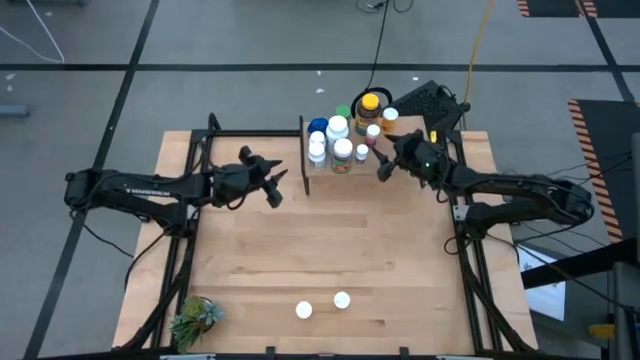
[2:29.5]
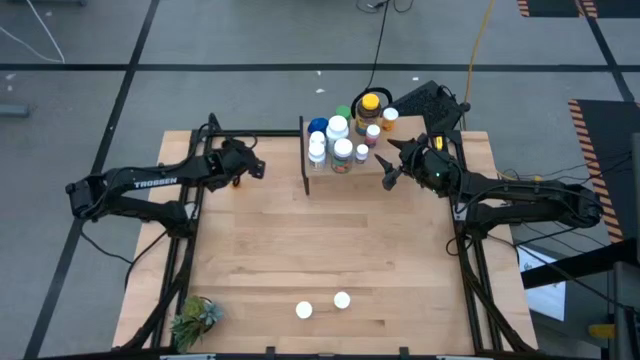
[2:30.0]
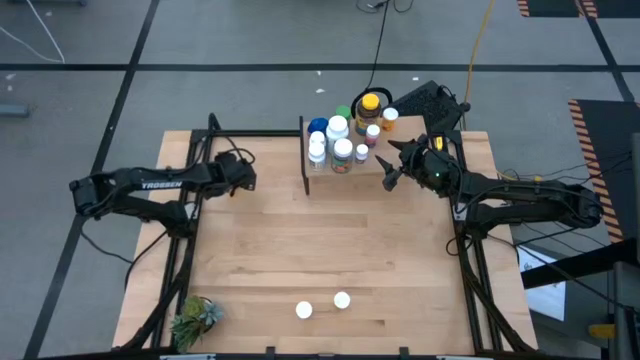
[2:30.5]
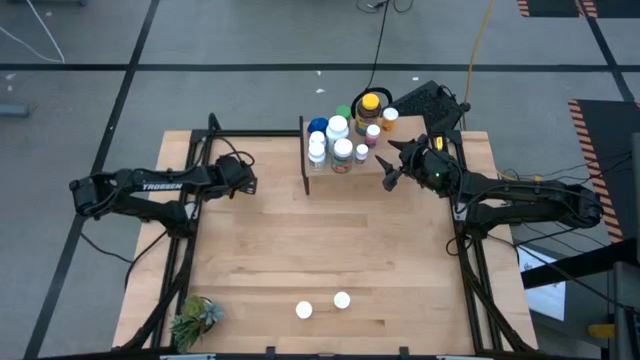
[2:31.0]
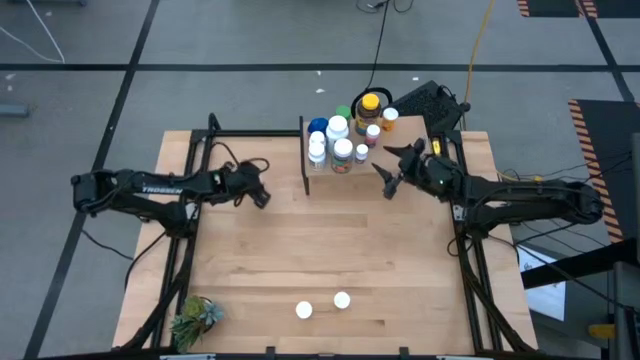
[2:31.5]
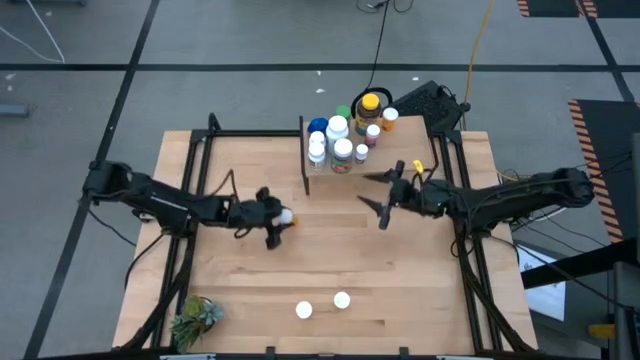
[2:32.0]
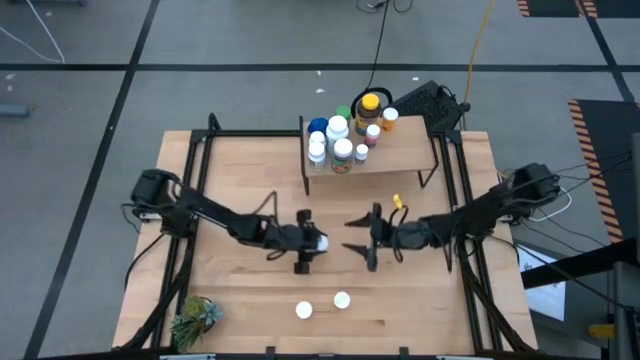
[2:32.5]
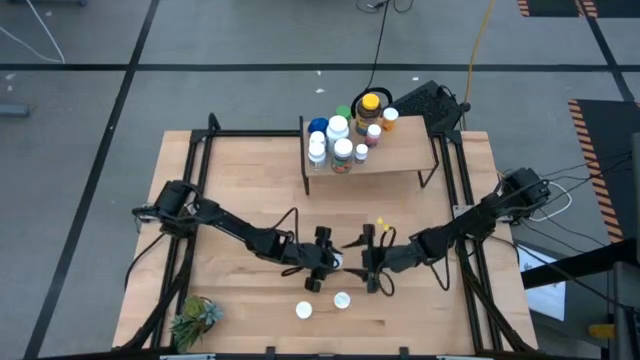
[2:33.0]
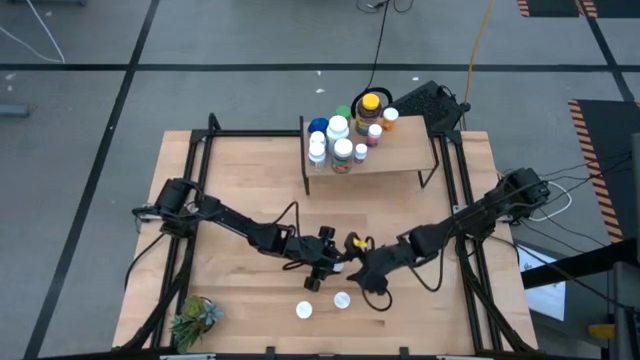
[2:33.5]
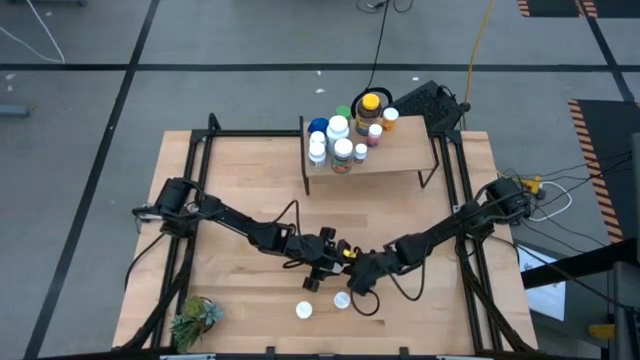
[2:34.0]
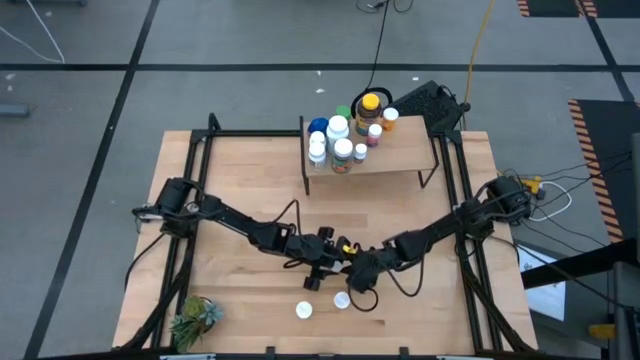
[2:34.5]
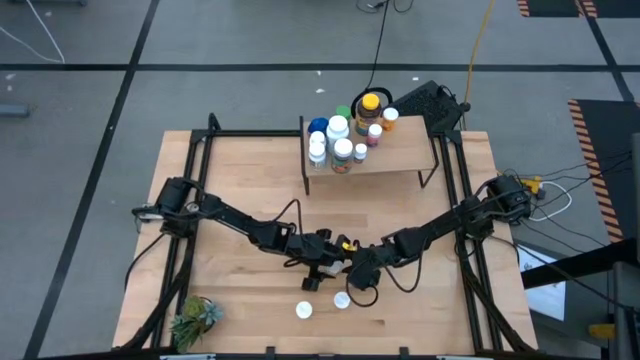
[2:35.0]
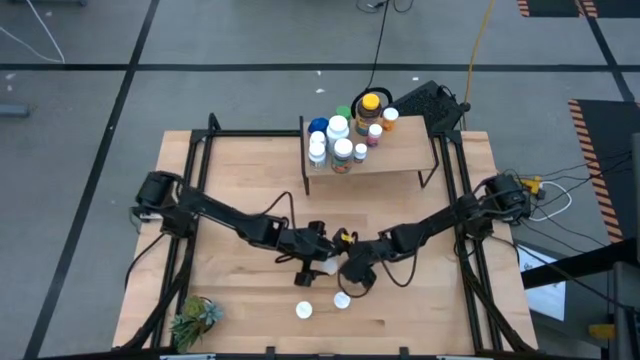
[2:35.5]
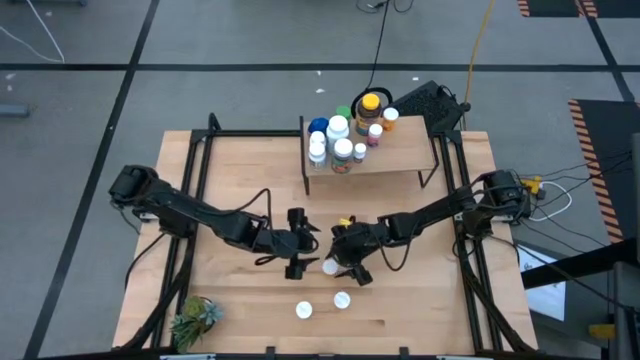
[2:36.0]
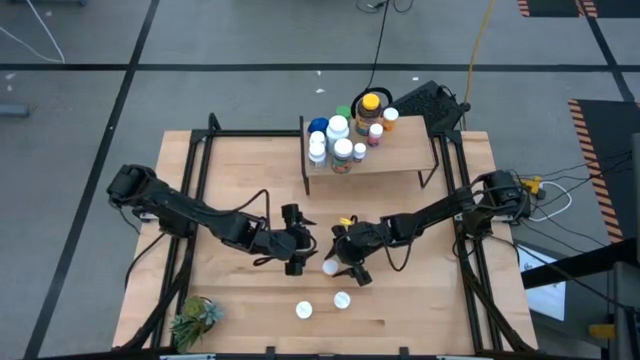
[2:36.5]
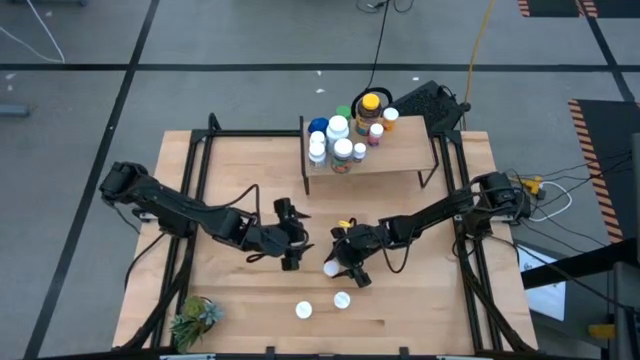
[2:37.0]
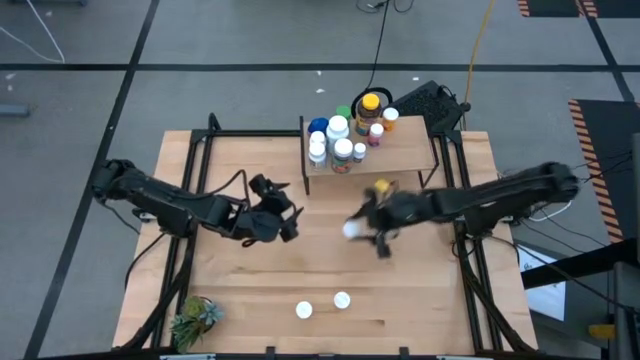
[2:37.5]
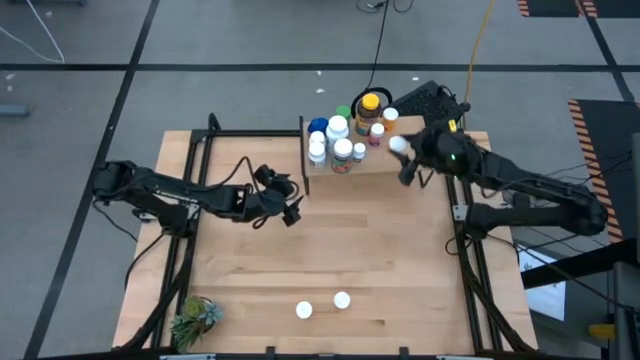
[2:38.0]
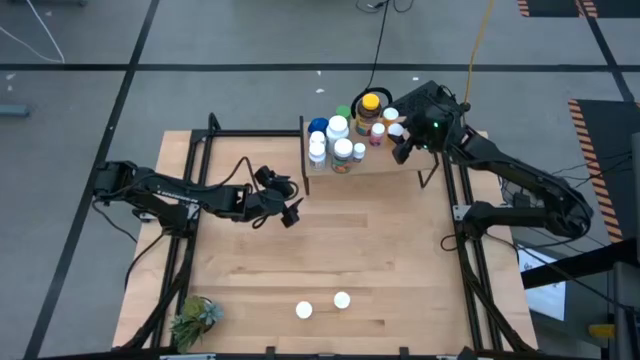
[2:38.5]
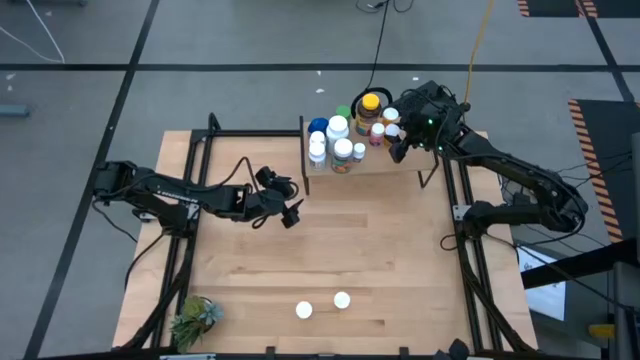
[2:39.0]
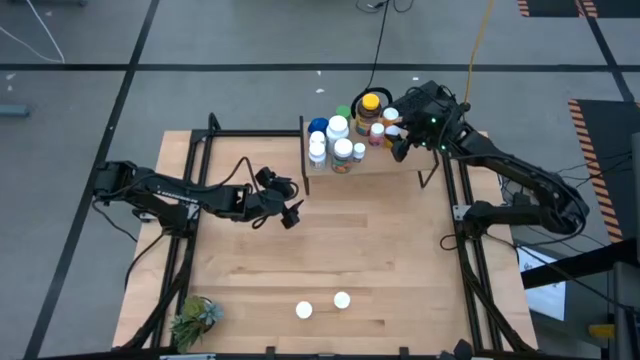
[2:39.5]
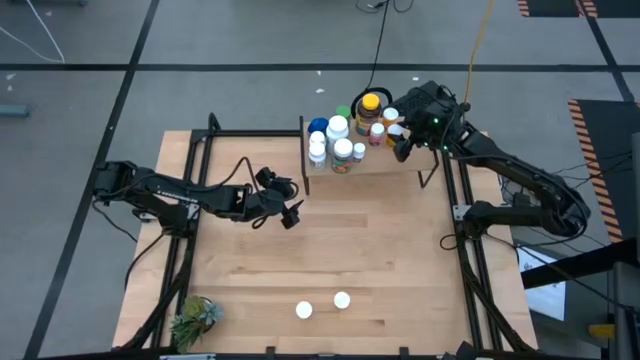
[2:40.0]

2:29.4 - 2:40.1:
Task: Pick and place medicine bottles onto shelf by color
Put the orange bottle on the shelf

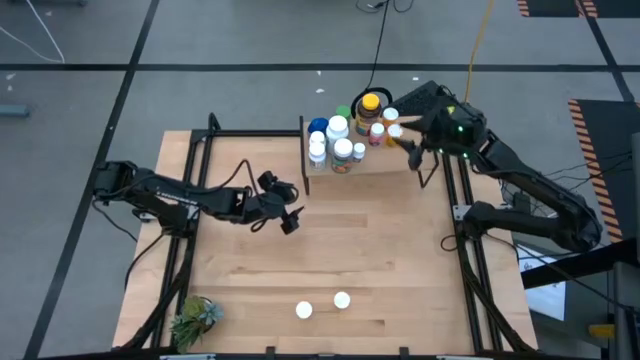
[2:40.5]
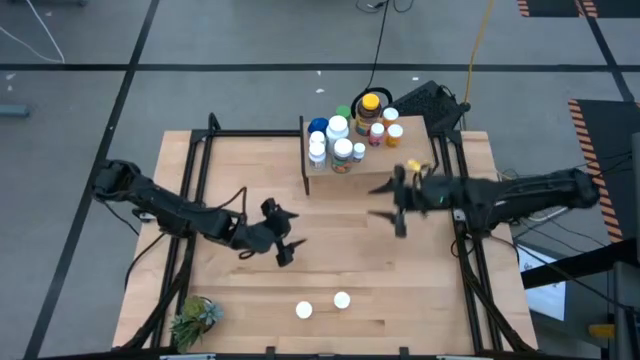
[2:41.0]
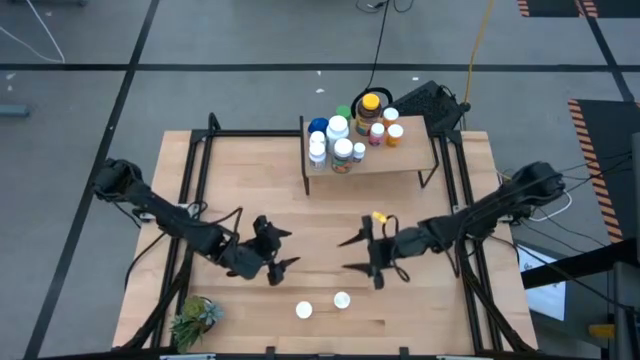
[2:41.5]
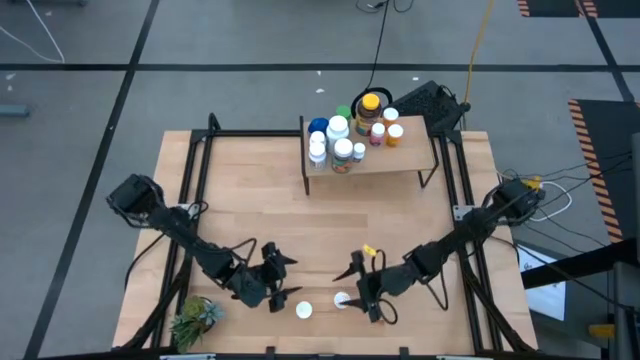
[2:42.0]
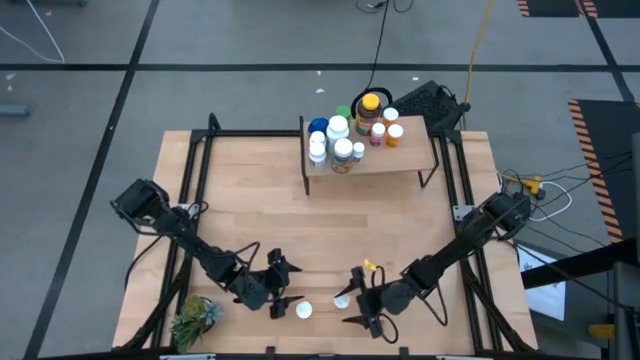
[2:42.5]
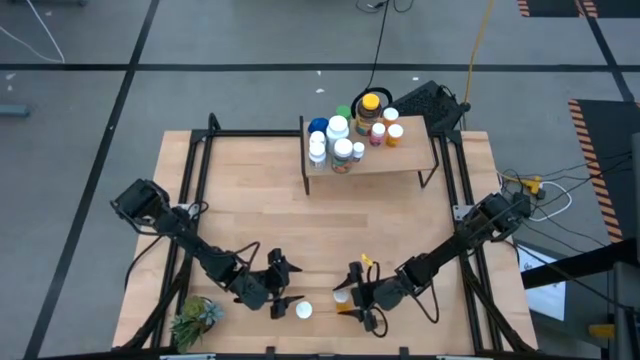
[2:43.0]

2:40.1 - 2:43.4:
Put the orange bottle on the shelf

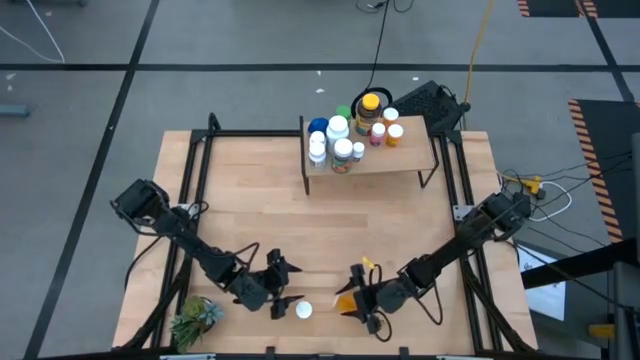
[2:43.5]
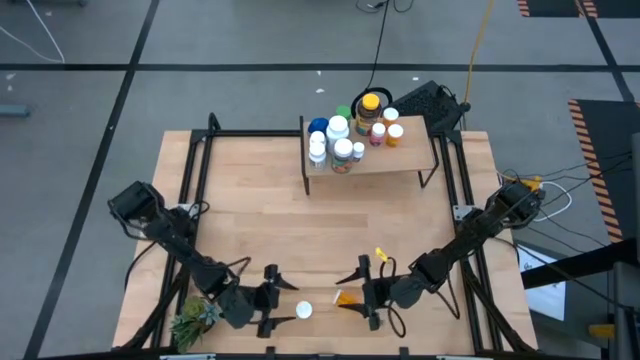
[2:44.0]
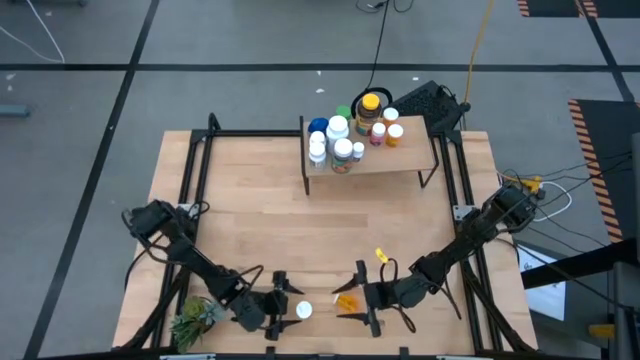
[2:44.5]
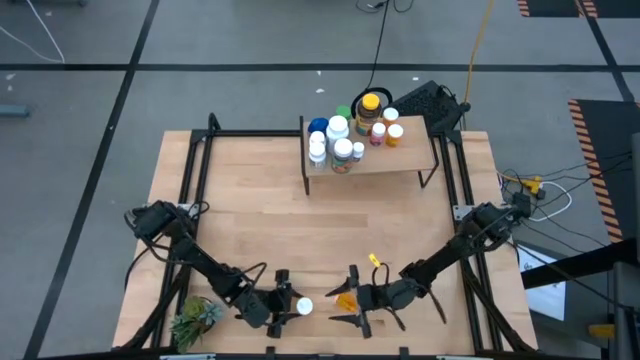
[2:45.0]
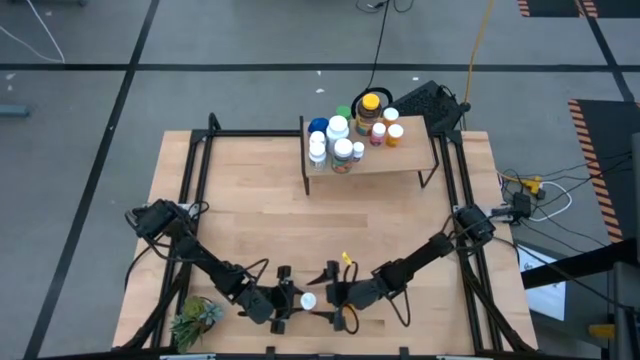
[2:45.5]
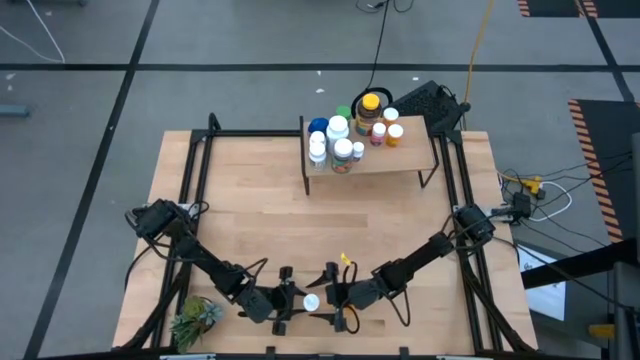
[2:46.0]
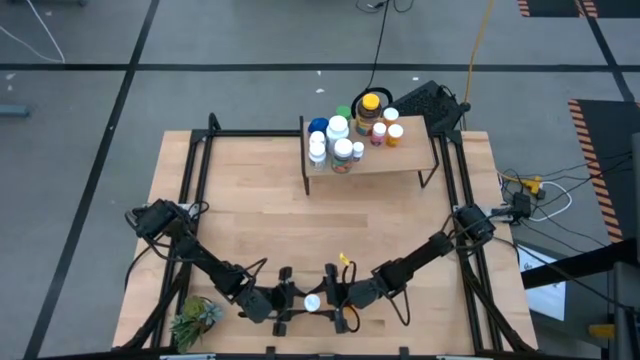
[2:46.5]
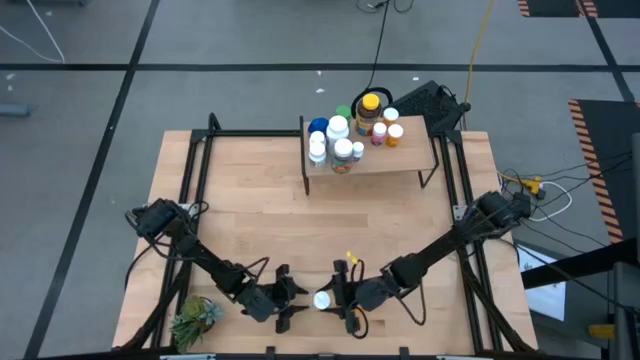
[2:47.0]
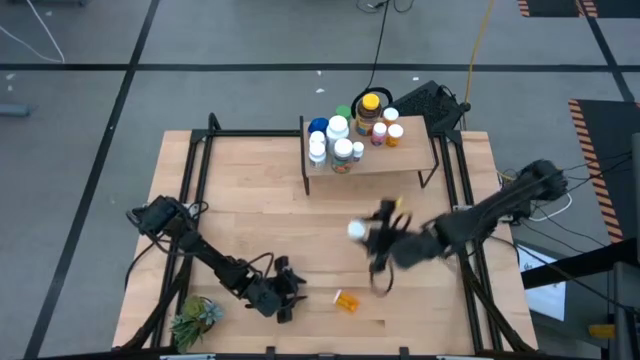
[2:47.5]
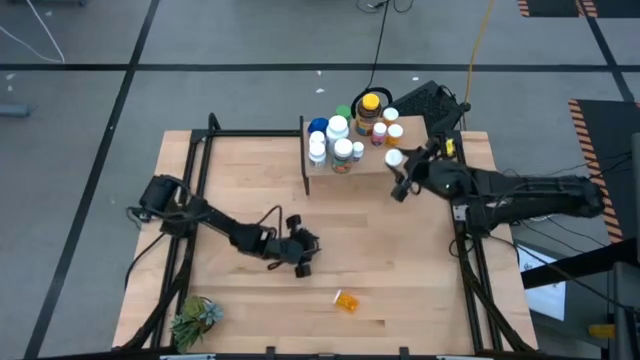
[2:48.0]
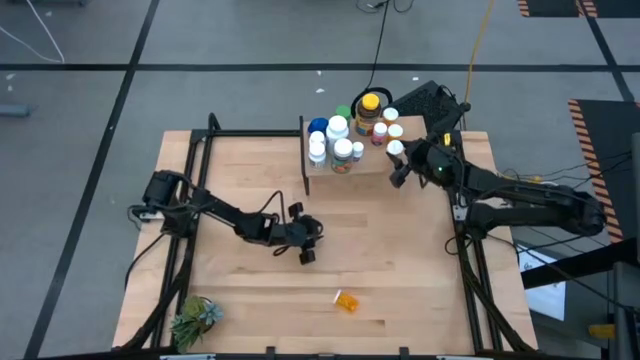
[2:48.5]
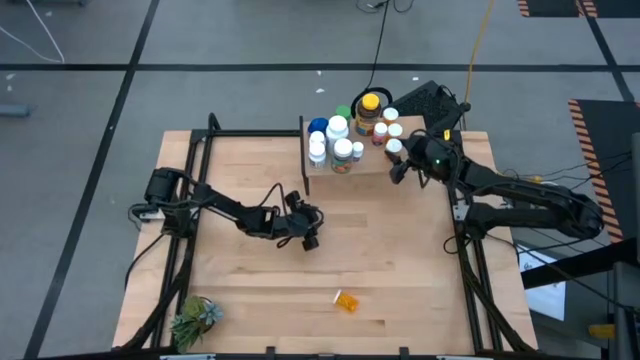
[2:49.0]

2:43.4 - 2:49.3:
Put the orange bottle on the shelf

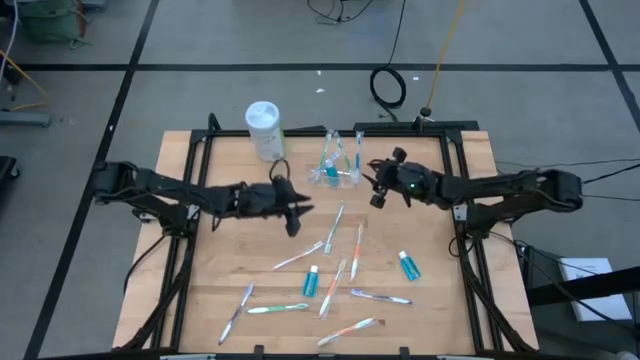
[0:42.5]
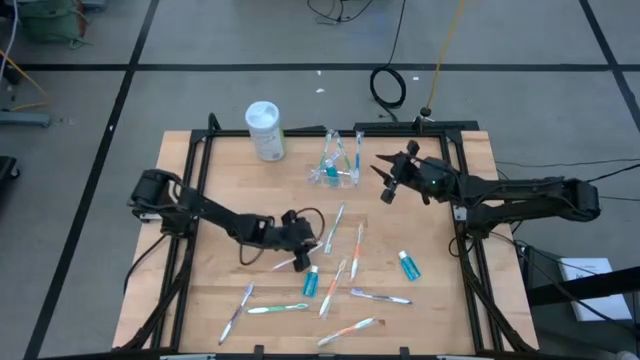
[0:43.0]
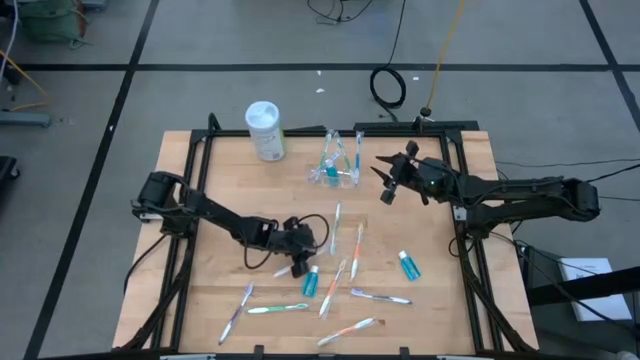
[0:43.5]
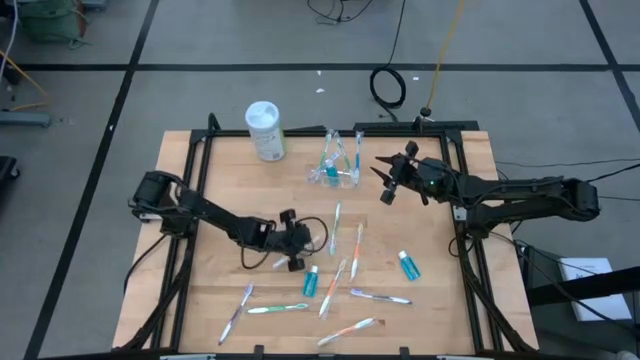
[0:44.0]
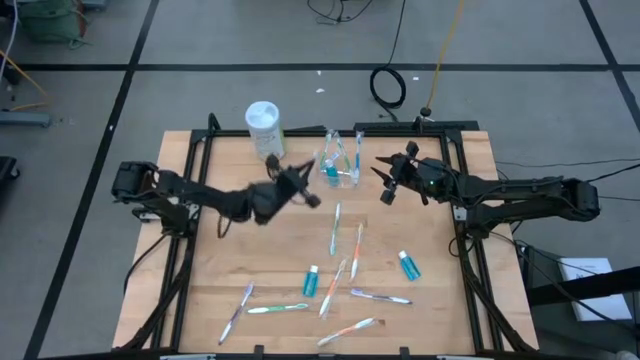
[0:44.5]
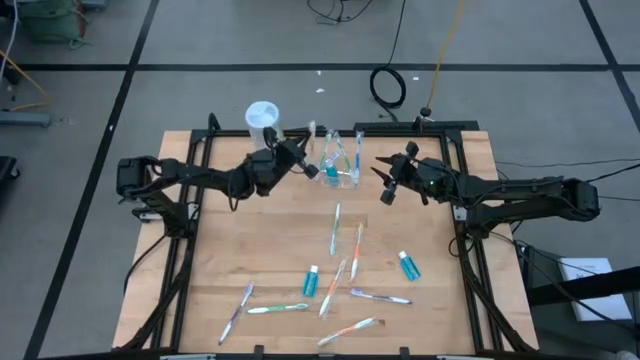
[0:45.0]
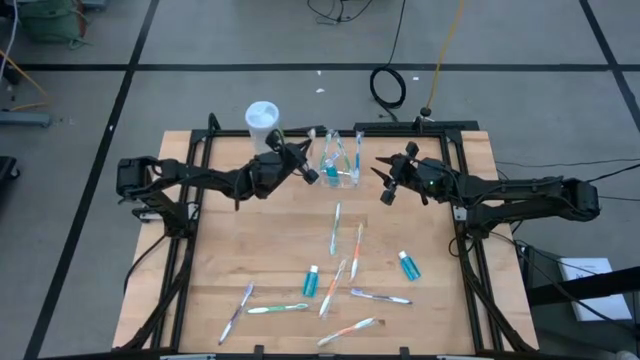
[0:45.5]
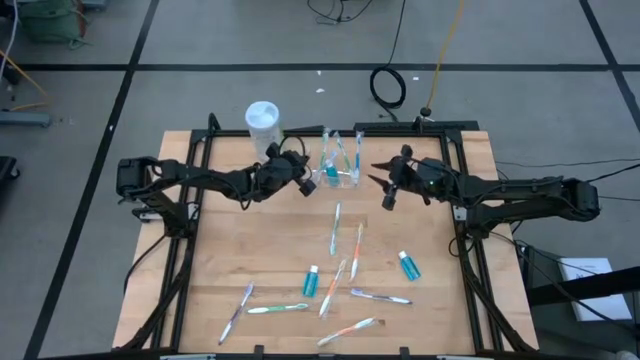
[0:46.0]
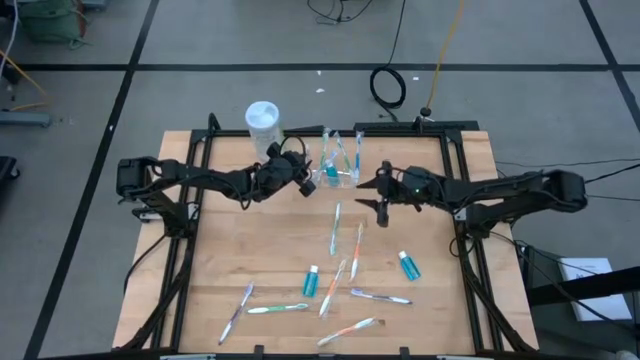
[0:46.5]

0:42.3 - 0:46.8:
Task: Pick & Place toothbrushing station
Put the orange toothbrush into the transparent organizer
